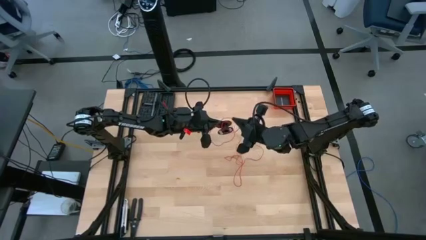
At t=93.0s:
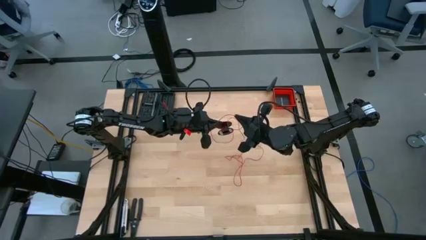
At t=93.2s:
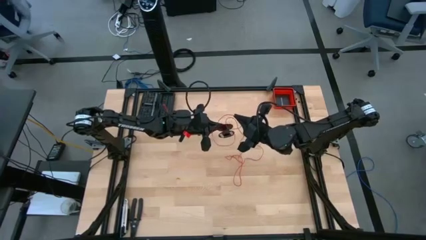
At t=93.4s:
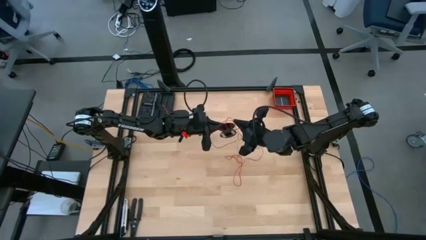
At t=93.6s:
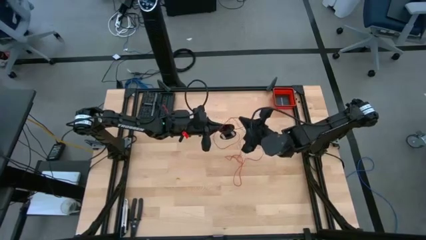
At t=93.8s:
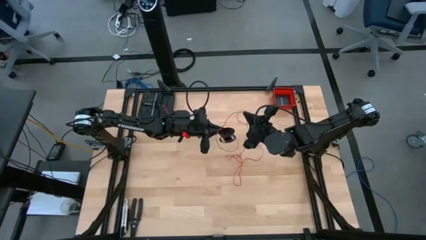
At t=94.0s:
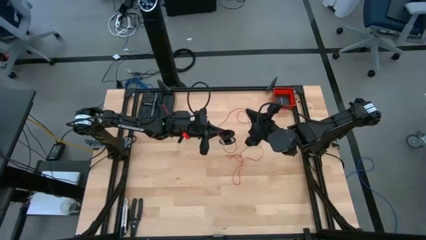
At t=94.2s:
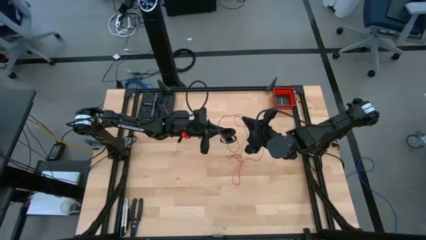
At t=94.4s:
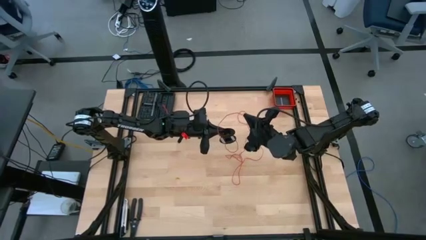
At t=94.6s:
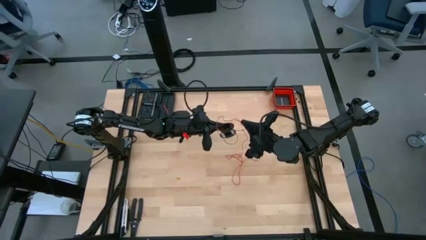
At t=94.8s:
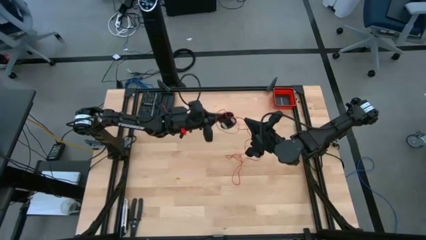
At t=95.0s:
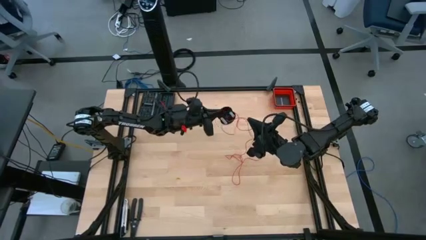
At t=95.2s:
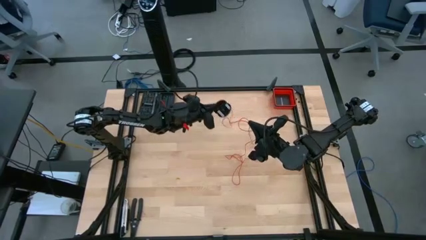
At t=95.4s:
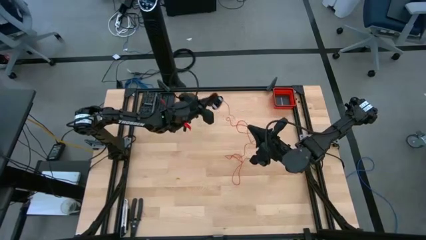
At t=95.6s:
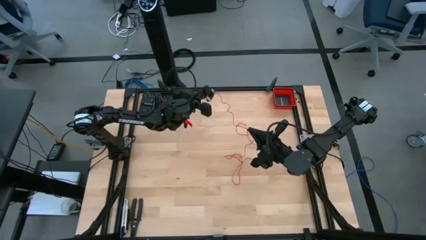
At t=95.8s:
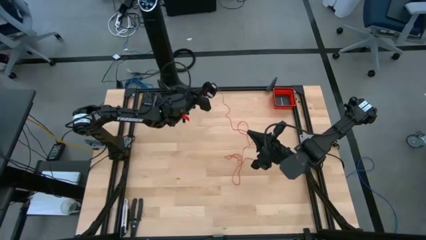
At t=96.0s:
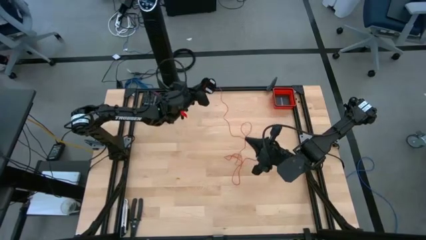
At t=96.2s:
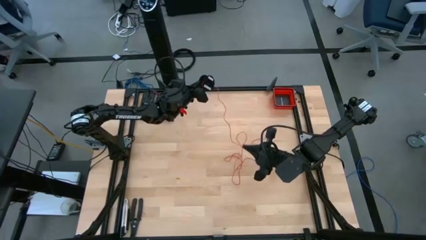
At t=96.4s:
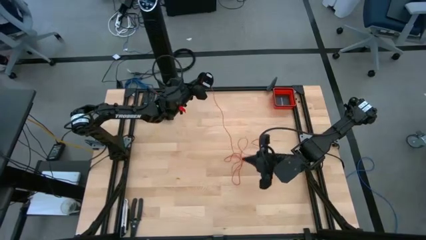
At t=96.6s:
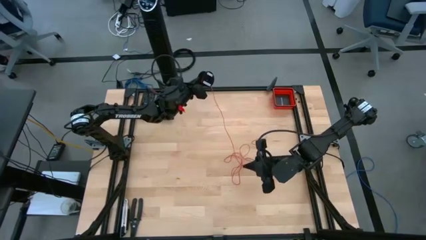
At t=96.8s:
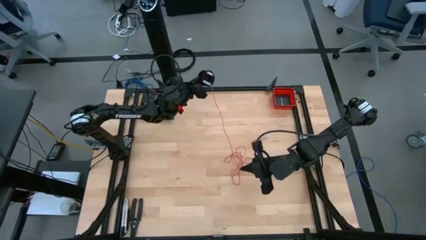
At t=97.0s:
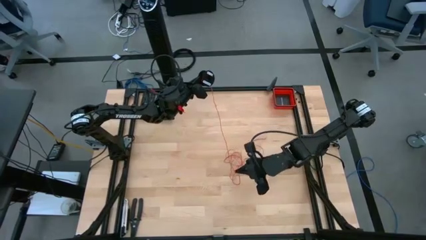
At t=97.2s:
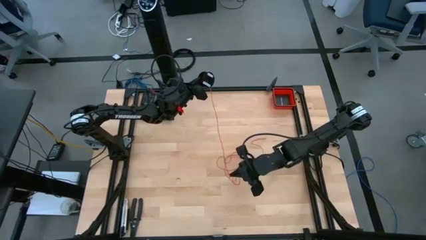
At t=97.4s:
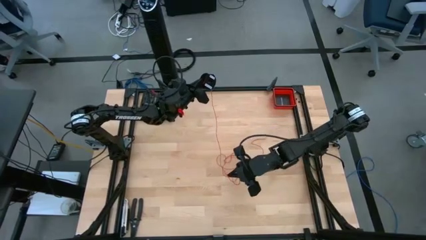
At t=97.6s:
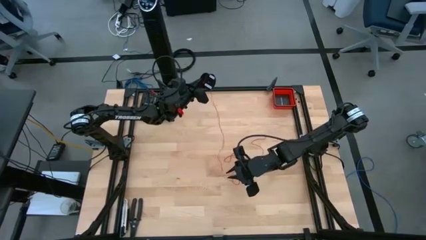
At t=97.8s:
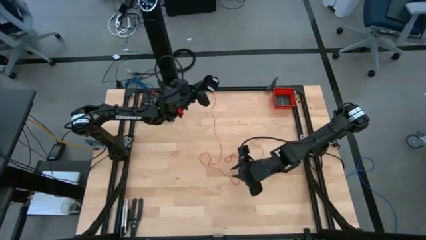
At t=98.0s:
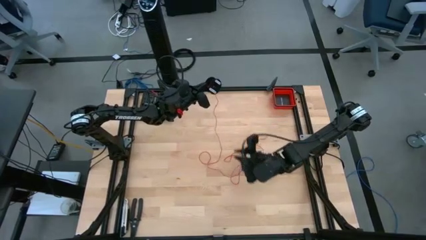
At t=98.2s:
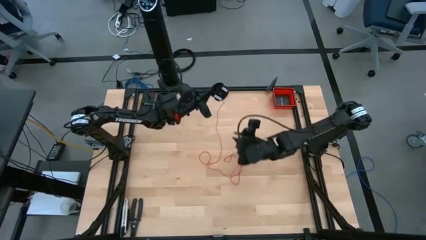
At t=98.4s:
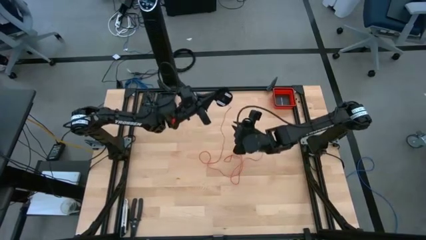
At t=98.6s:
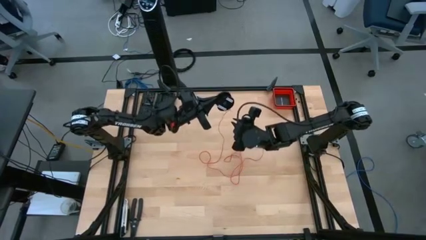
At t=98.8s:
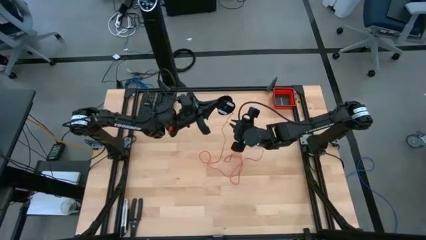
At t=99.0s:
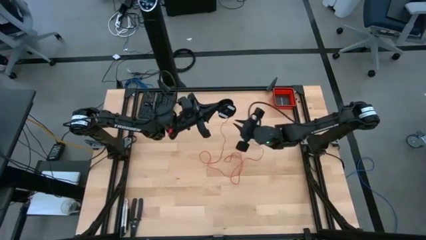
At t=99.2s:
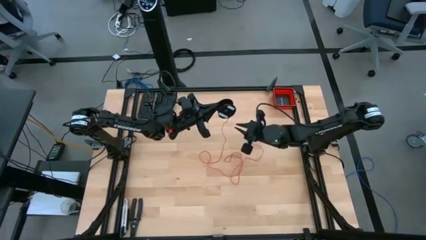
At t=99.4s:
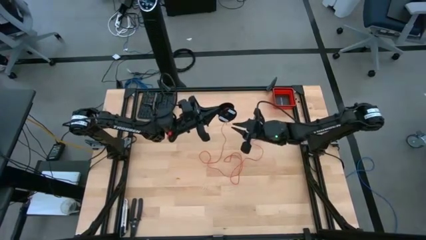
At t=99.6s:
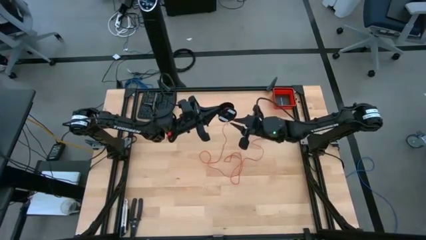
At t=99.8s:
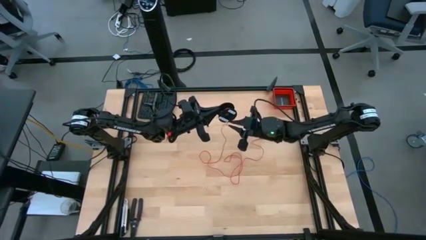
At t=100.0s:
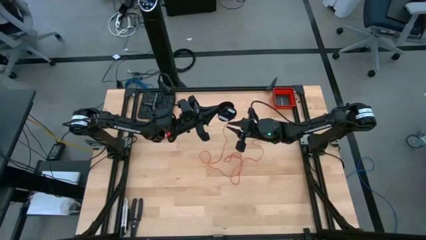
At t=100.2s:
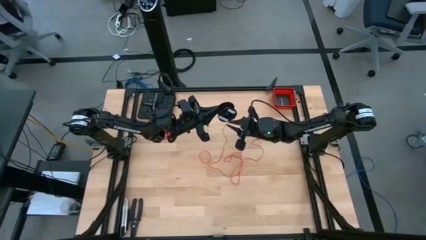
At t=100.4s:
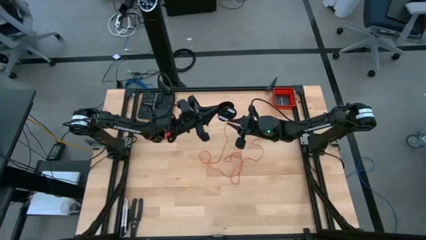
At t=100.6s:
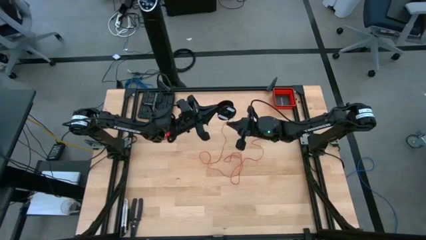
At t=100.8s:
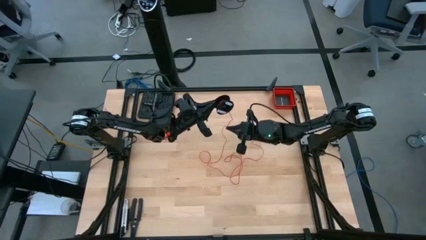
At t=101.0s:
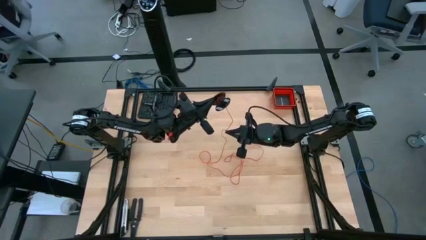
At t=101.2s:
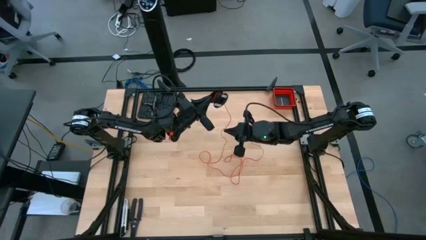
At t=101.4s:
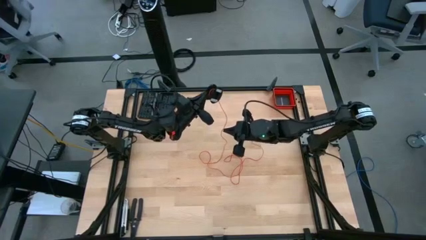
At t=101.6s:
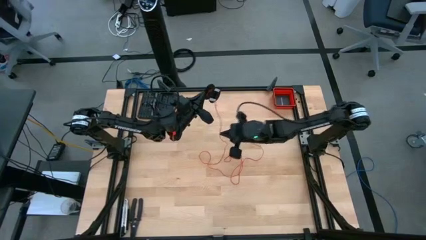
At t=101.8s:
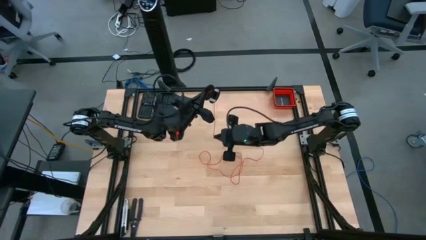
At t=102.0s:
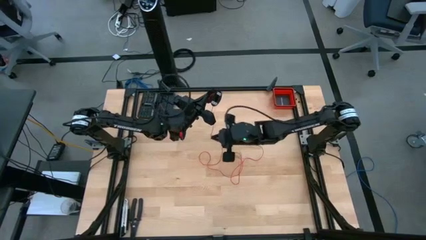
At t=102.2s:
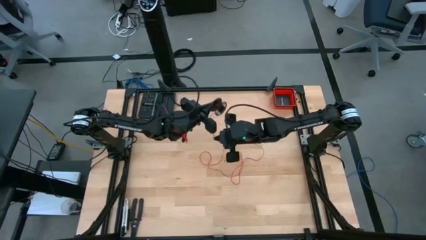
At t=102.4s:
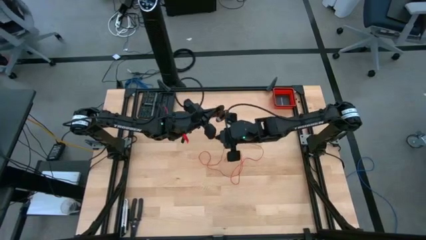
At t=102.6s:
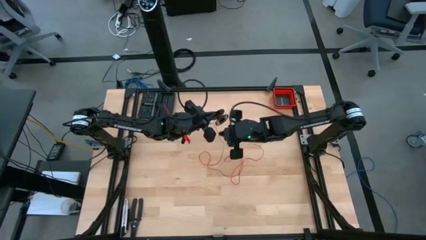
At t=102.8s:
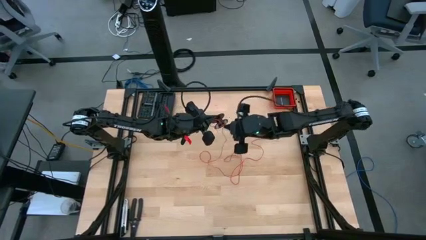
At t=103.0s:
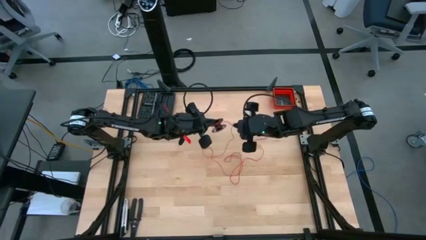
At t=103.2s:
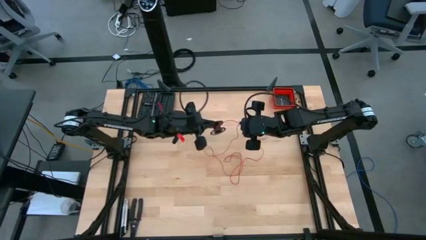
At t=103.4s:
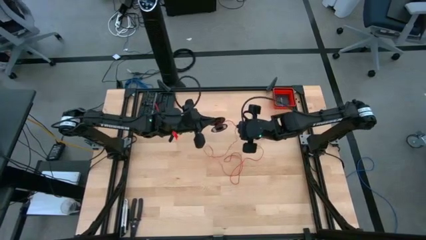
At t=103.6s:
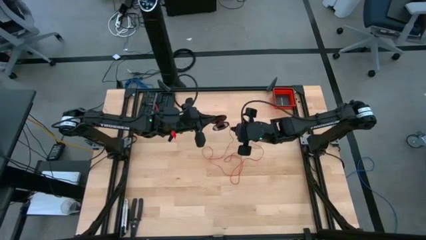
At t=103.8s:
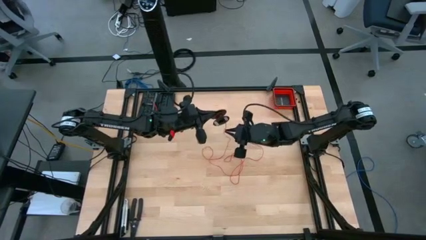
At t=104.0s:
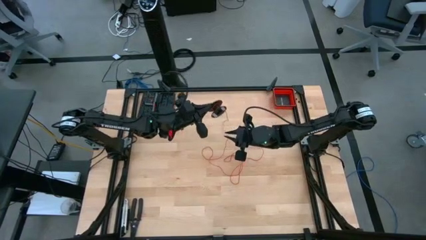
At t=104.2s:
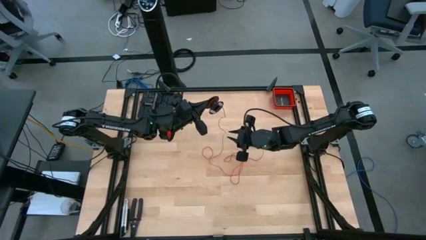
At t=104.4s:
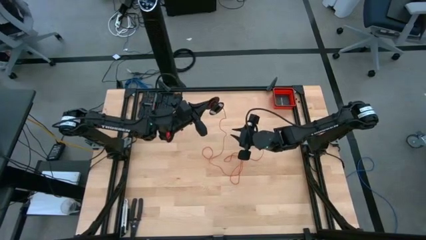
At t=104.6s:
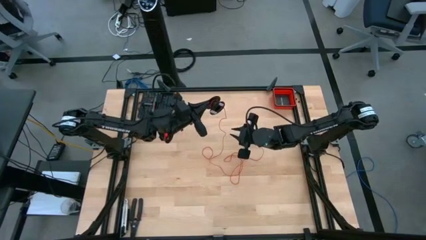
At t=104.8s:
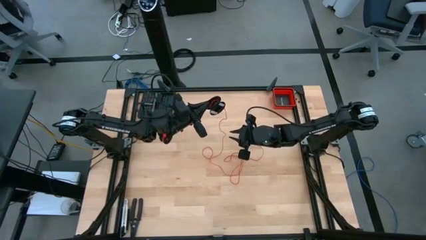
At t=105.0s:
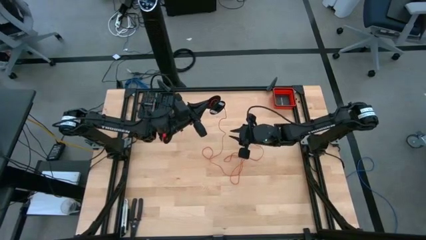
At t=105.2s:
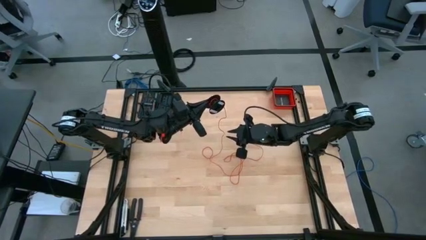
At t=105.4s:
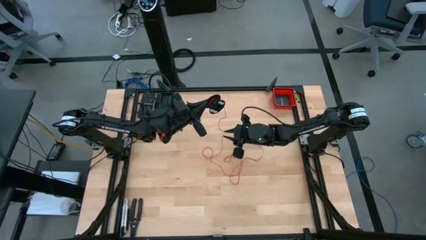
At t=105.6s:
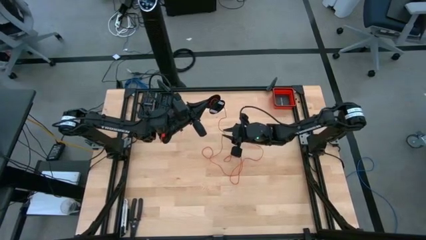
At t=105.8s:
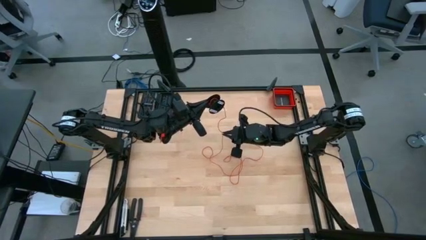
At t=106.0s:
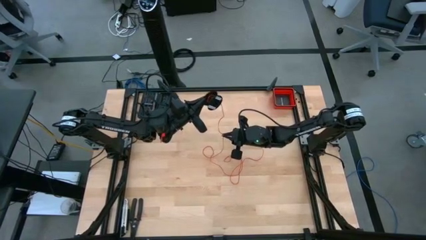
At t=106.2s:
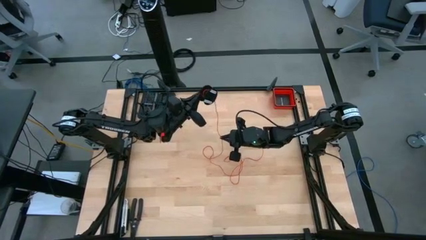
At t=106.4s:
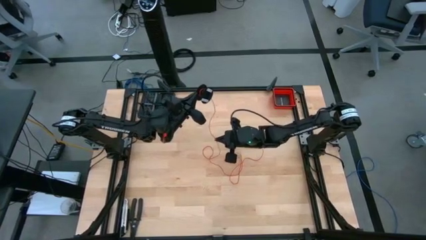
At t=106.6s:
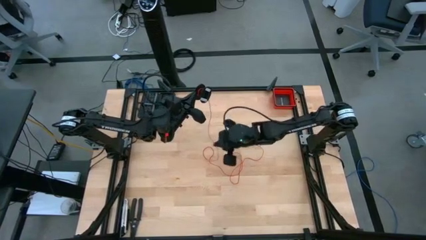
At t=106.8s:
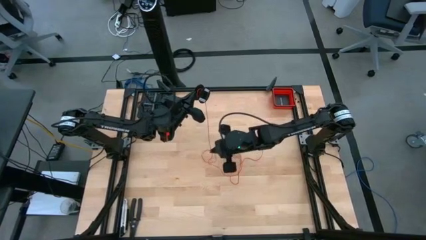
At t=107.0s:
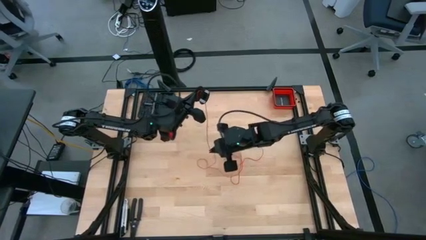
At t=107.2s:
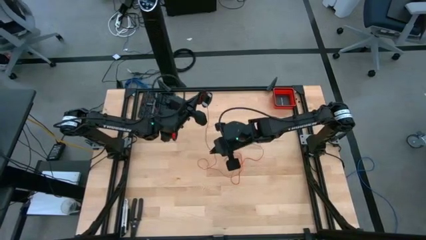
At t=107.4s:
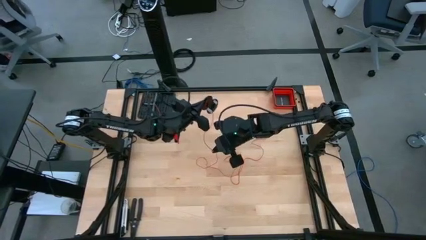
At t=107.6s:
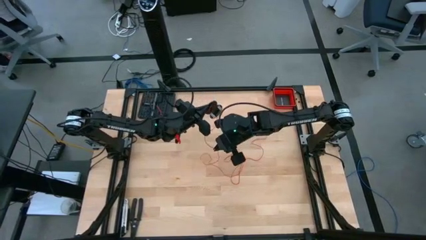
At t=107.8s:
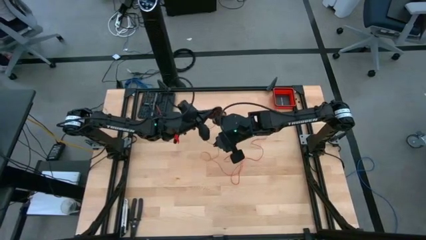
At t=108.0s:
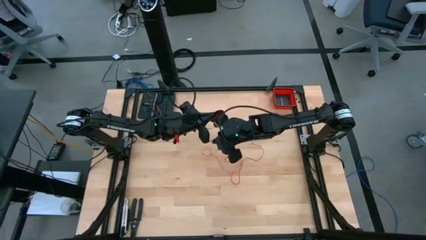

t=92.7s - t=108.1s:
Task: Coil cords
Coil the red wire on the black spool
